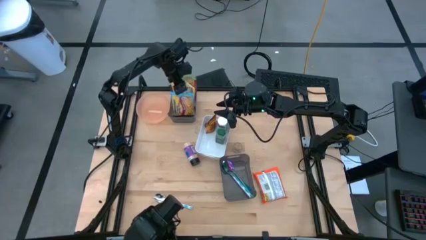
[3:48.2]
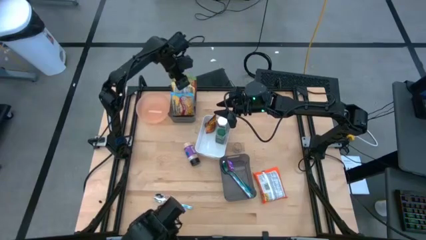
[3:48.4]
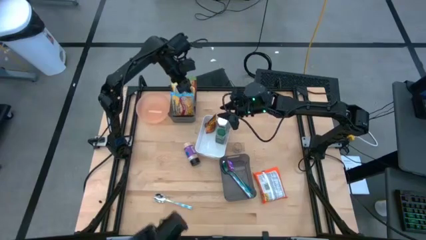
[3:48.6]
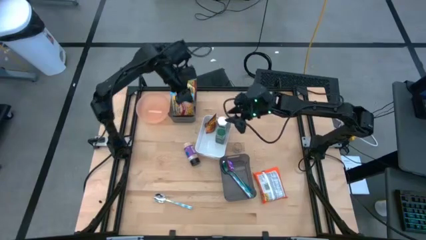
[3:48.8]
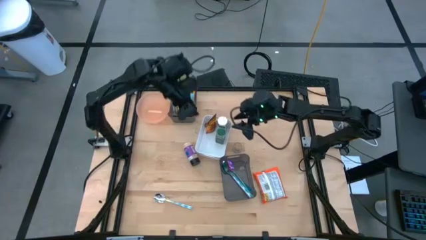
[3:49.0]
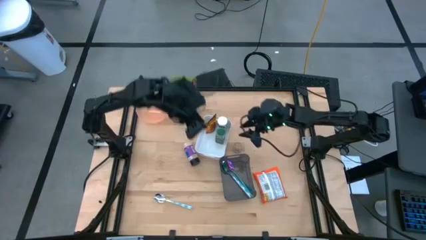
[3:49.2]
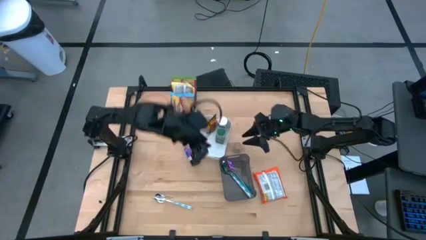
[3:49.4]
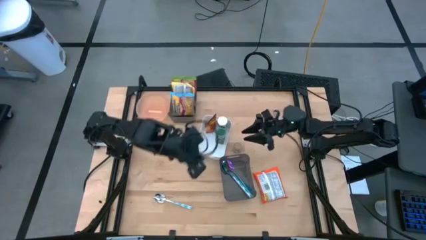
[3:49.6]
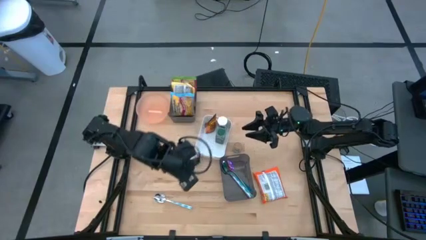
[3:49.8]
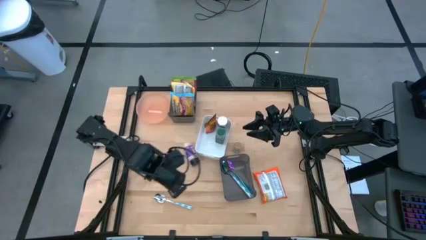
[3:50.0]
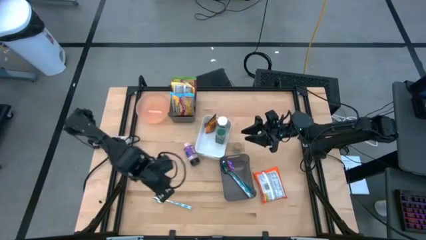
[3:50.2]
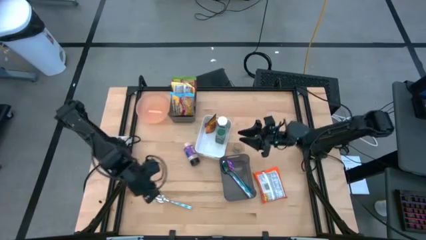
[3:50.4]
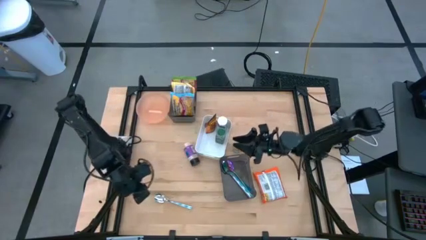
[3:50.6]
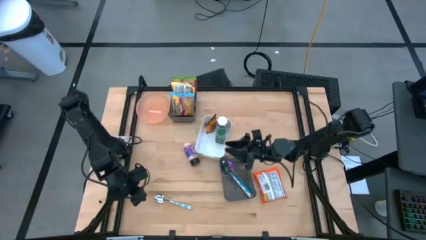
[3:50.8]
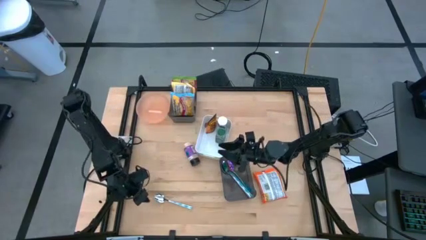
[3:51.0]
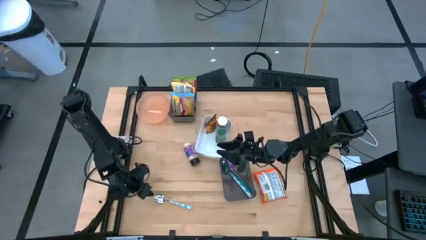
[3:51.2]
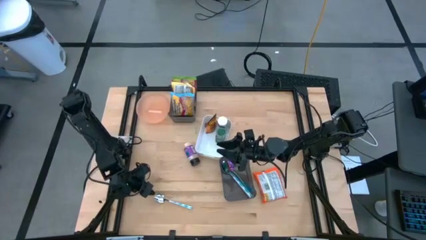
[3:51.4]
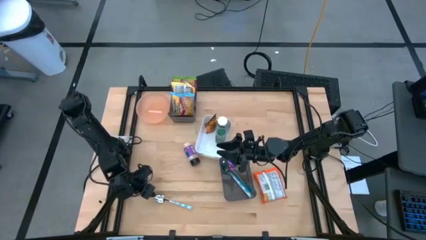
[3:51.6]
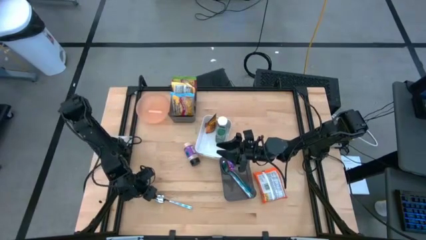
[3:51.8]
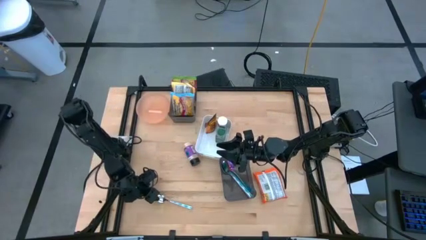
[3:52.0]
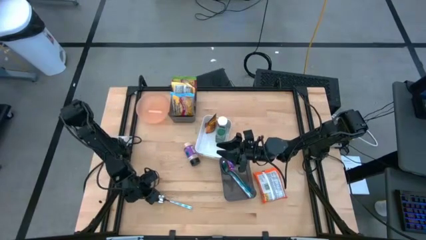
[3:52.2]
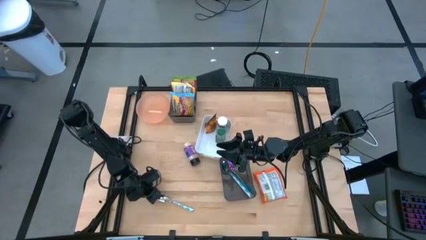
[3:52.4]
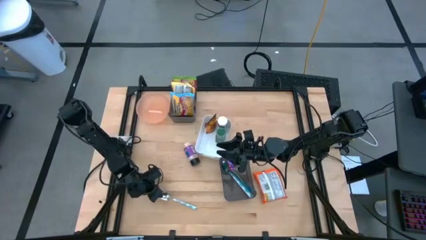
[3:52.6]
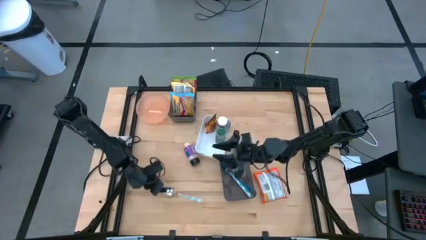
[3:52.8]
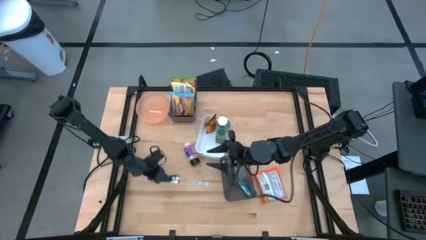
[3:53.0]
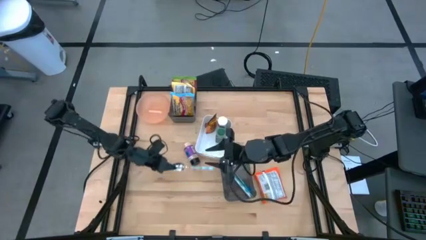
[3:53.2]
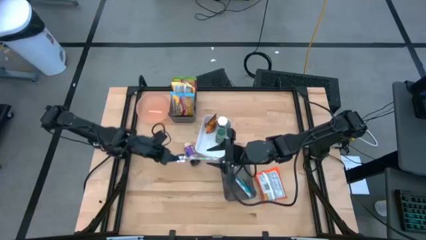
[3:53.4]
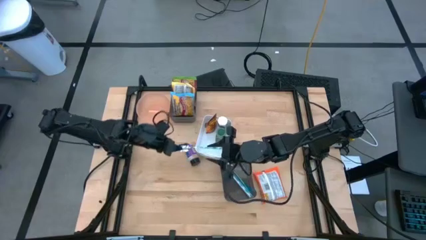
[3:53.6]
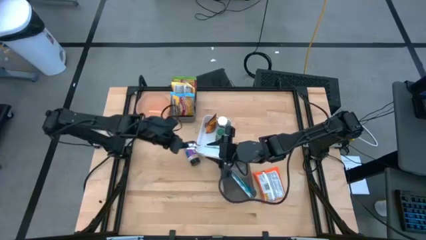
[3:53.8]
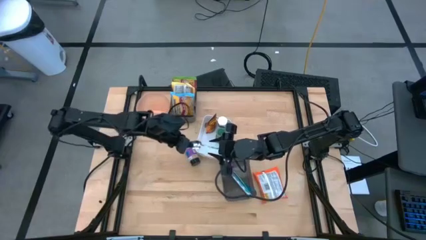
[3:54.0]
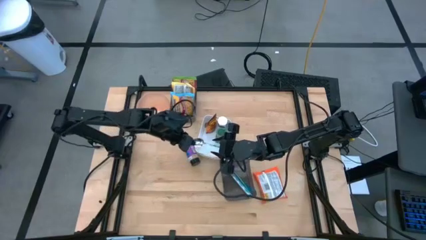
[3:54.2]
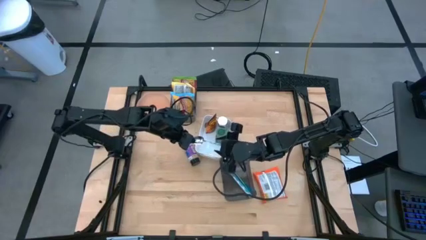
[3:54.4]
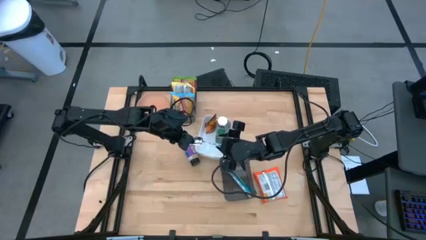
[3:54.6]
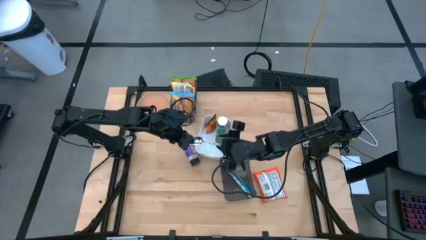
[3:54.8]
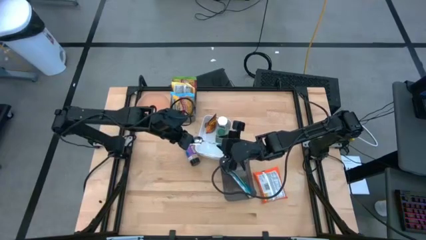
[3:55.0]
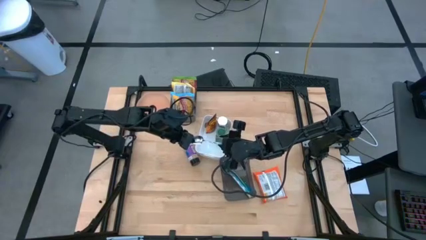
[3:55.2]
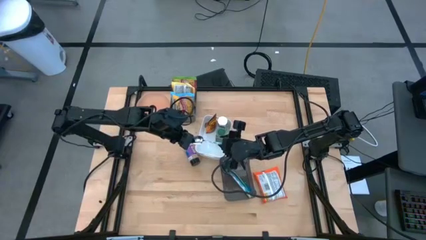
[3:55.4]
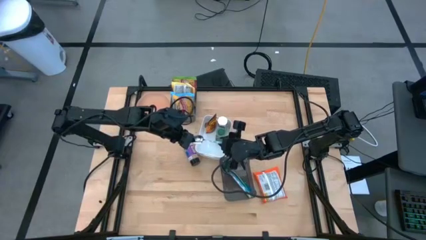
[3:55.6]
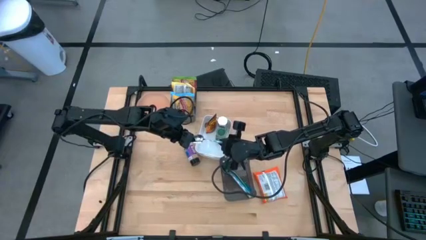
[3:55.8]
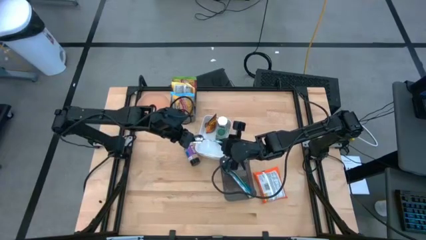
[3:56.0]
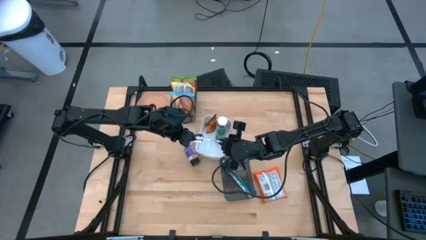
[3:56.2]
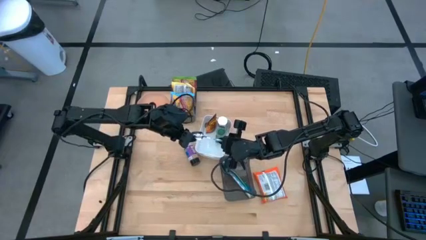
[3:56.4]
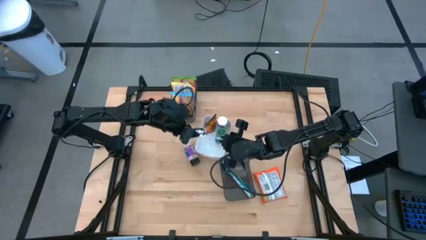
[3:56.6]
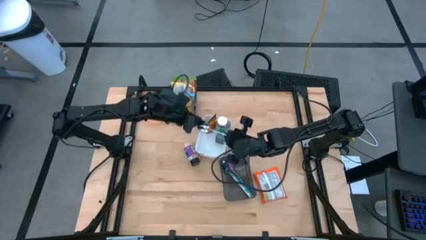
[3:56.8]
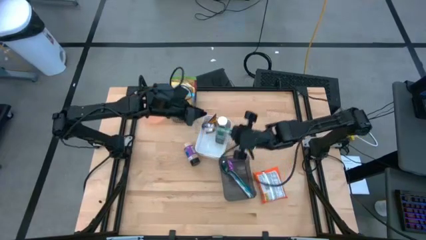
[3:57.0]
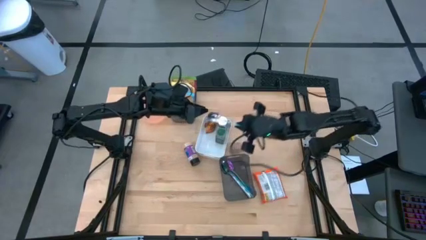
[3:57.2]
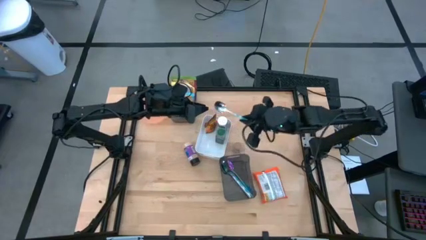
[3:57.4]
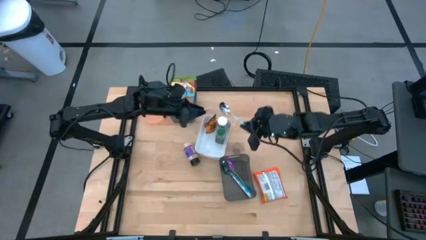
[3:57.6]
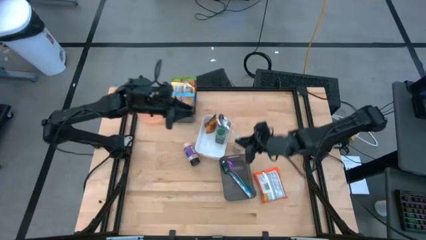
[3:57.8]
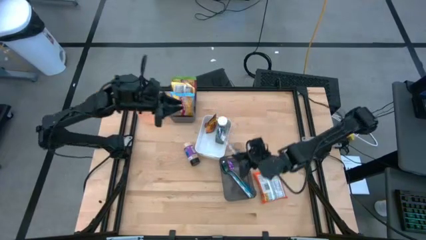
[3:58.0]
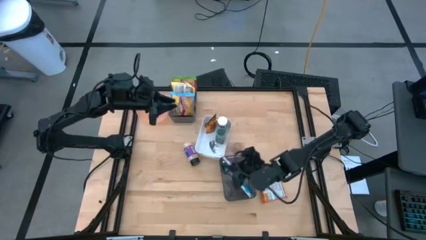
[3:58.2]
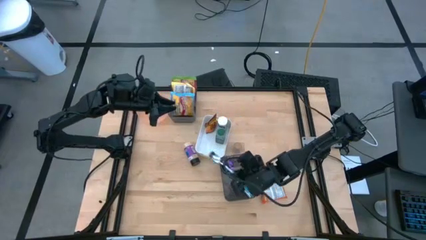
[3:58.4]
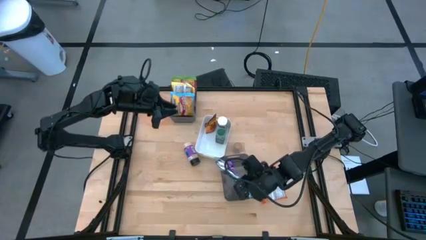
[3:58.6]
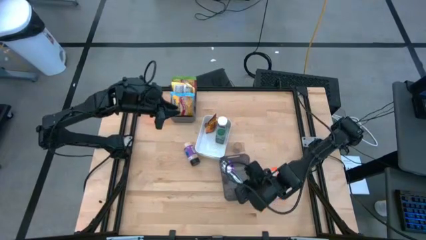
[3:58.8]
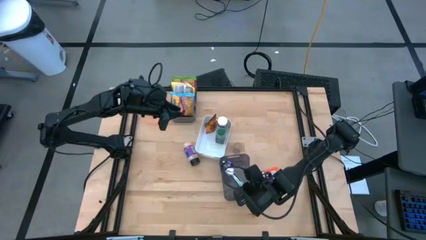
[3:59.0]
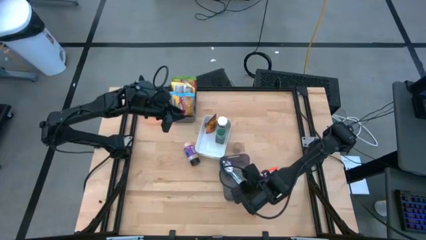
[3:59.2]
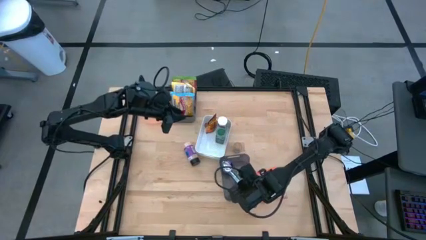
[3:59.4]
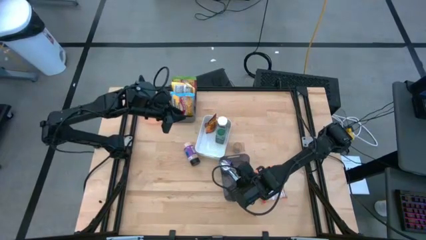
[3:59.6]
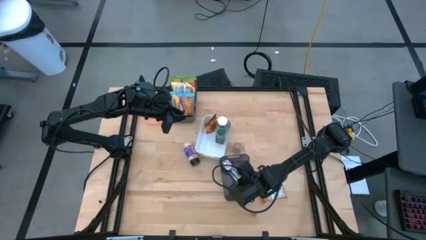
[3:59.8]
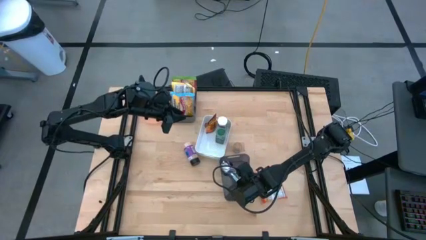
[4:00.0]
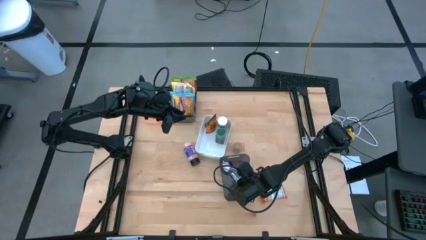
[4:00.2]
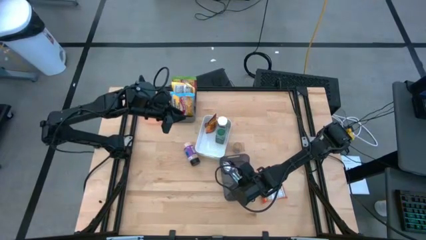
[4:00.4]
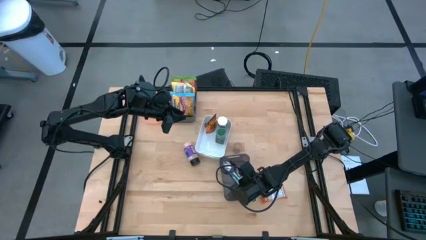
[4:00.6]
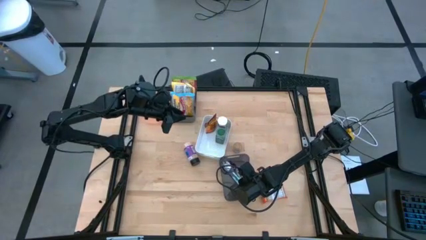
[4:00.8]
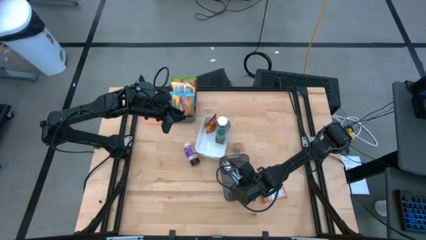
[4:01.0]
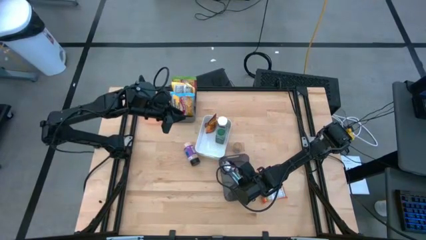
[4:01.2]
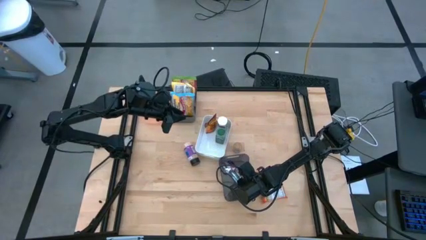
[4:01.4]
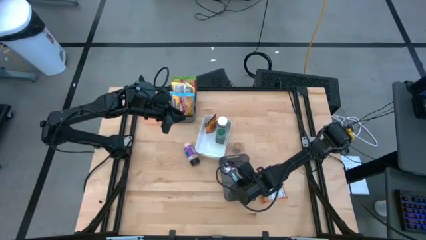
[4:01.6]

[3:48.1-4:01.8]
Task: Pick & Place Food Item
Put the white and blue spoon into the bottom black bin

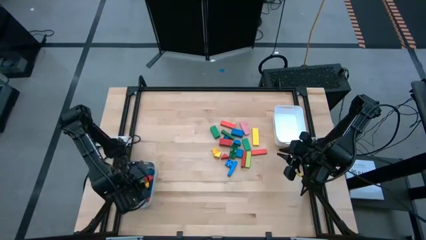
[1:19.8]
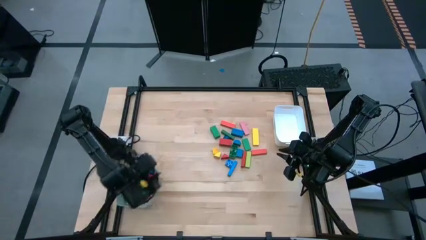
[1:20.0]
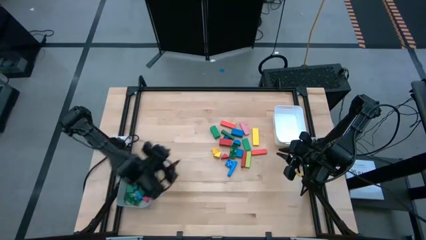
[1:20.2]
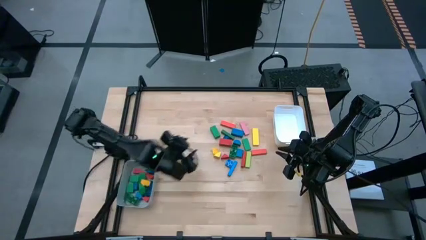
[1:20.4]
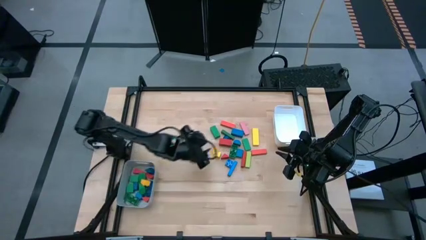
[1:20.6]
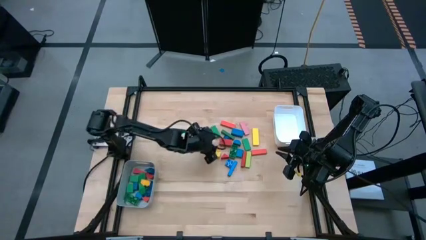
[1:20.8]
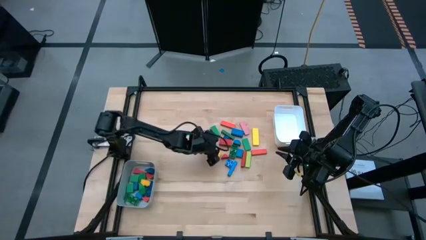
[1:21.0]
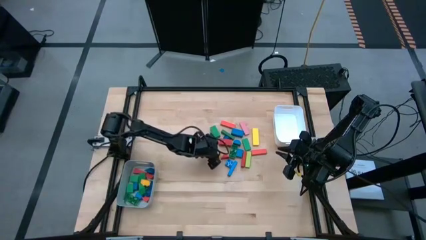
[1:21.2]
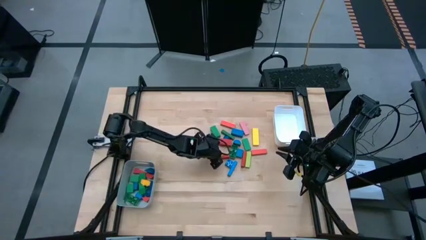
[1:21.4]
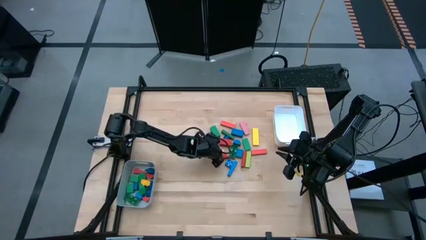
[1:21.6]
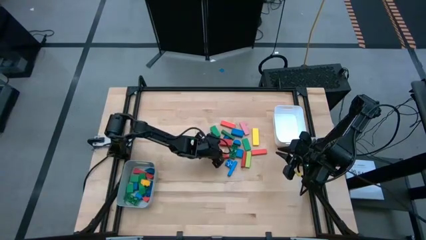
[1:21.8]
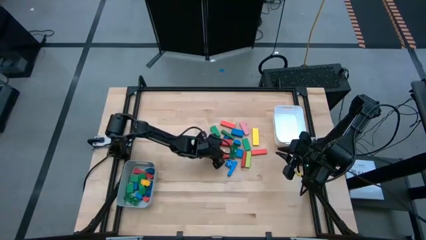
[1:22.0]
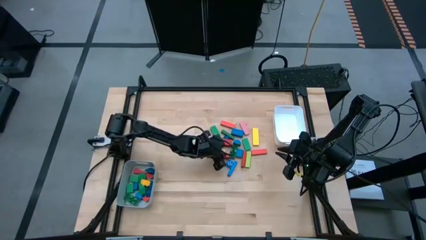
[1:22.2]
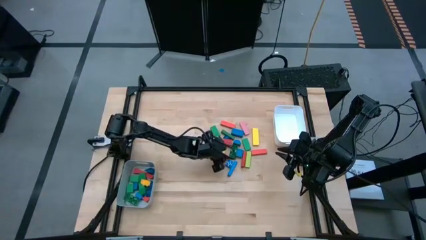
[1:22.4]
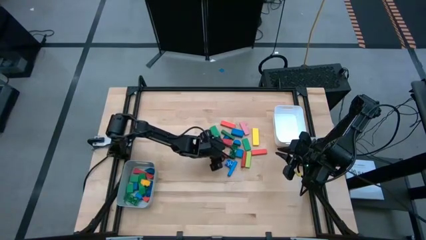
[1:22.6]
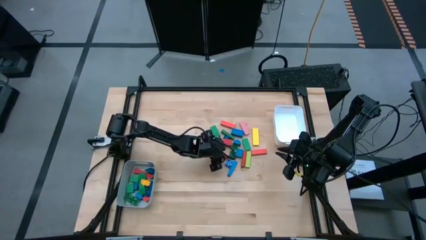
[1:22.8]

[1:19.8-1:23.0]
Task: Sort blocks by size
Put the yellow triangle block into the gray bin
